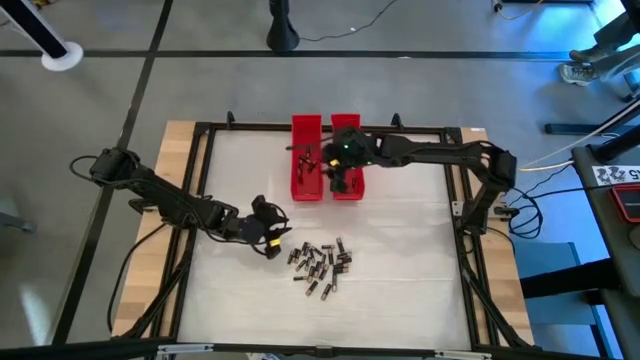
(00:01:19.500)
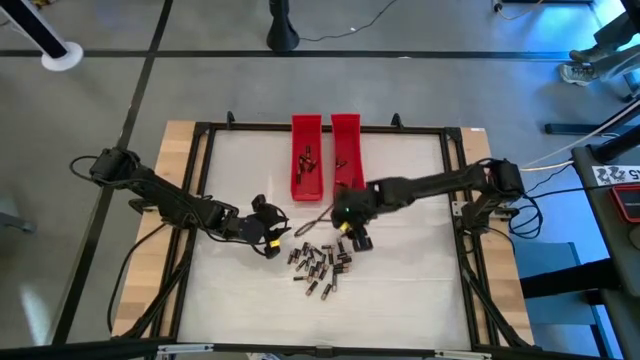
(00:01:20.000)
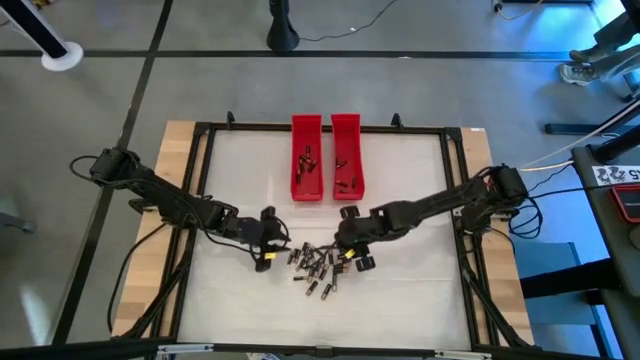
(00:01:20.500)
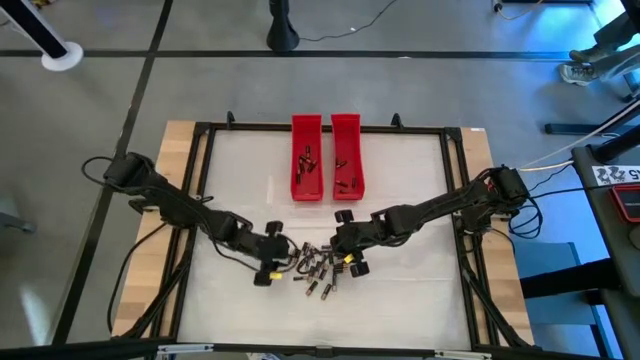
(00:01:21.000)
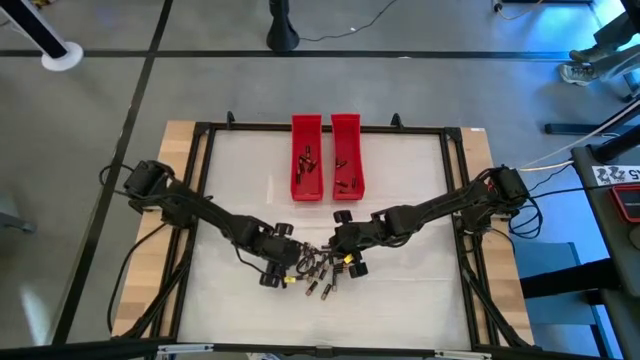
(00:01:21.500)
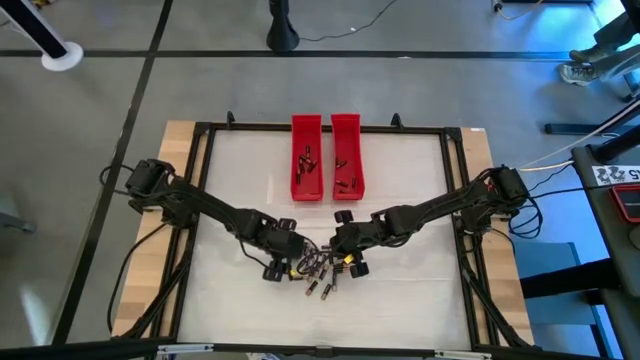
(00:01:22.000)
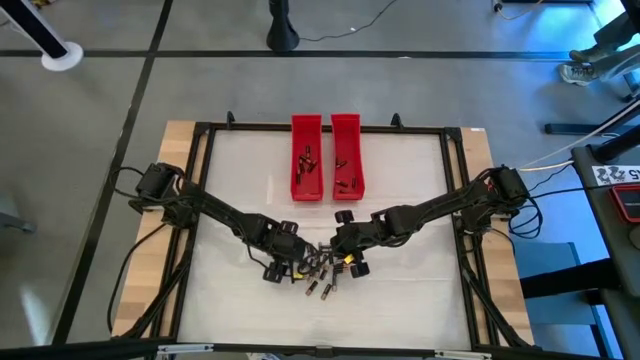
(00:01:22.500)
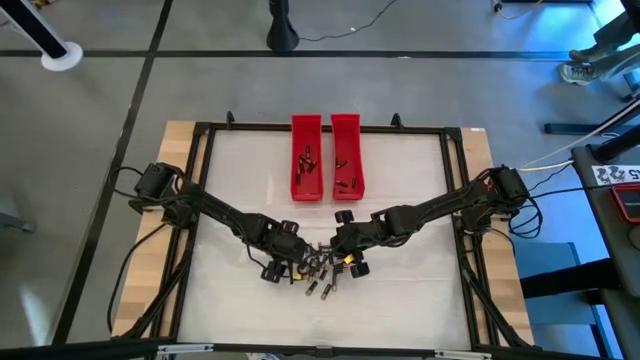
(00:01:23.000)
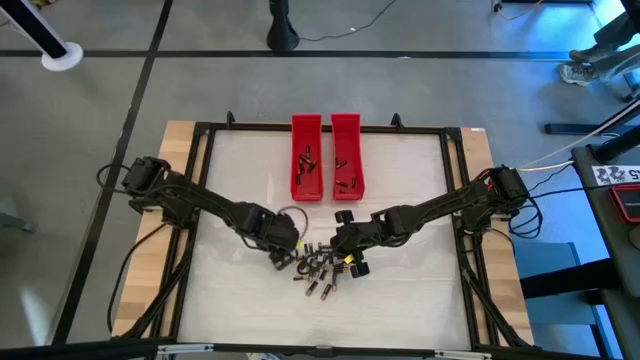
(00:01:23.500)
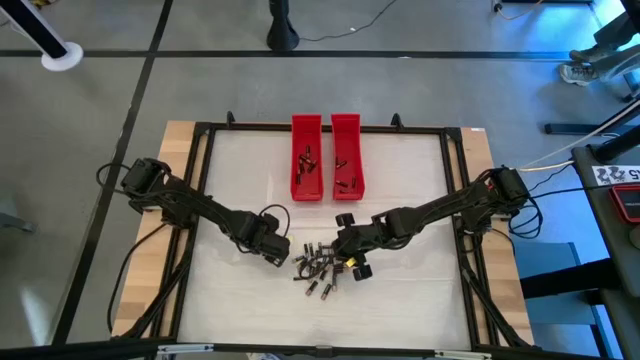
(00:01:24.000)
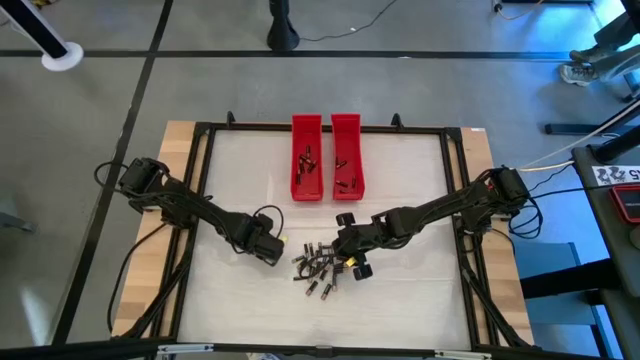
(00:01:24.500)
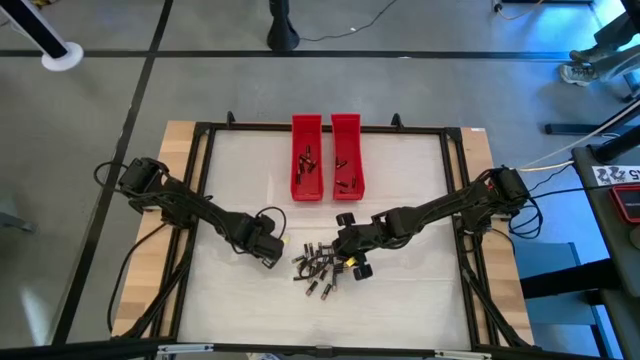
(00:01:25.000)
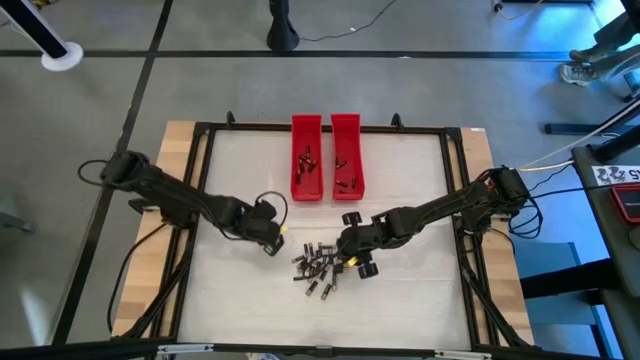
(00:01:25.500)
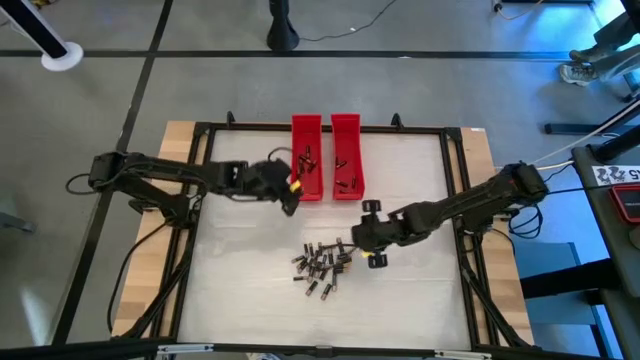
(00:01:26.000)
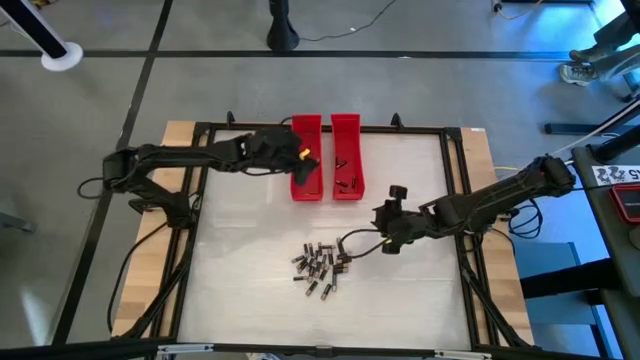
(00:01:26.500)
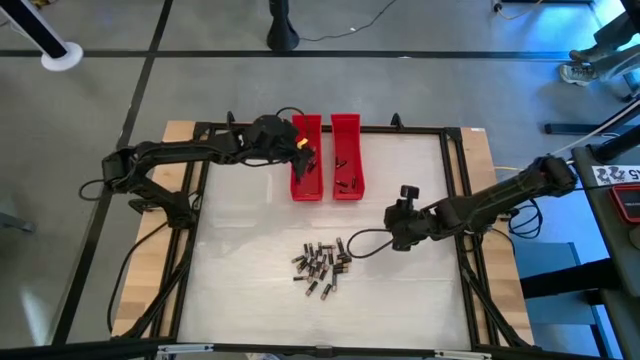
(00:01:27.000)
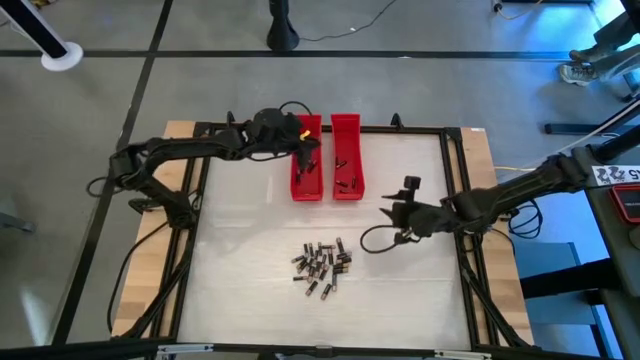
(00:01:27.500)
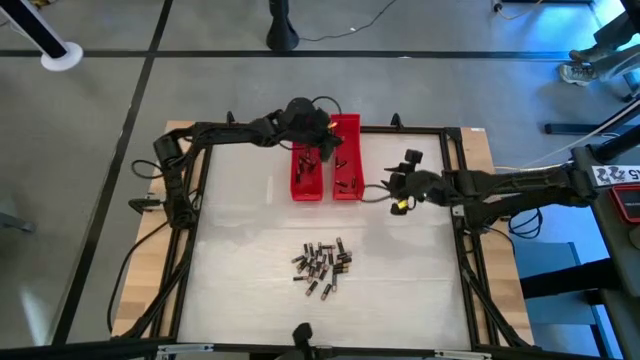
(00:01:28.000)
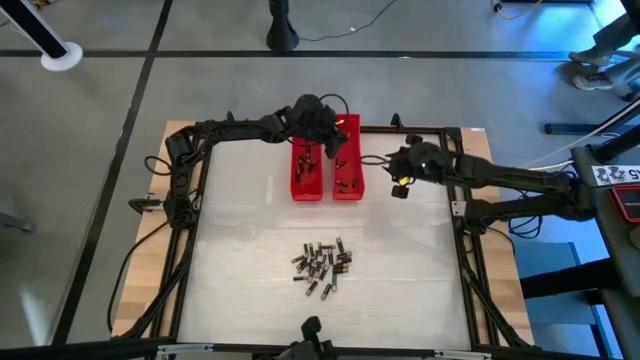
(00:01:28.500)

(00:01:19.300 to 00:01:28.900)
Task: Sort batteries
Put the small black battery into the right red bin

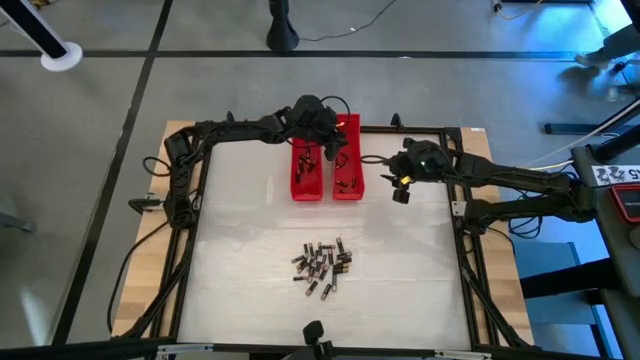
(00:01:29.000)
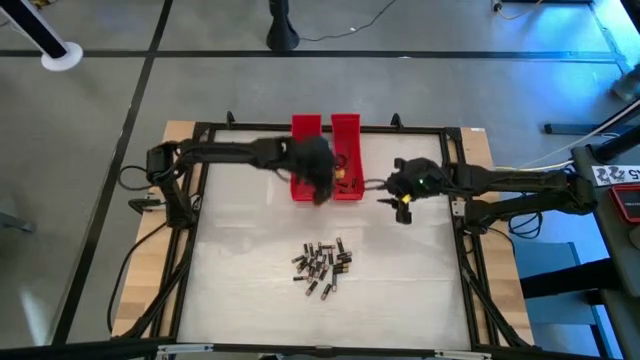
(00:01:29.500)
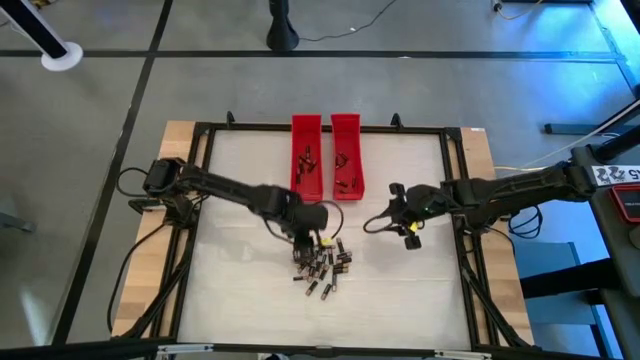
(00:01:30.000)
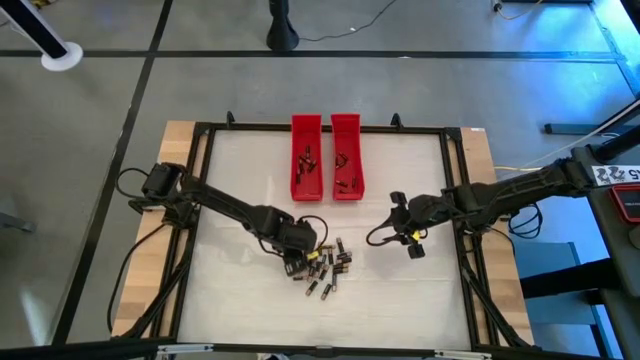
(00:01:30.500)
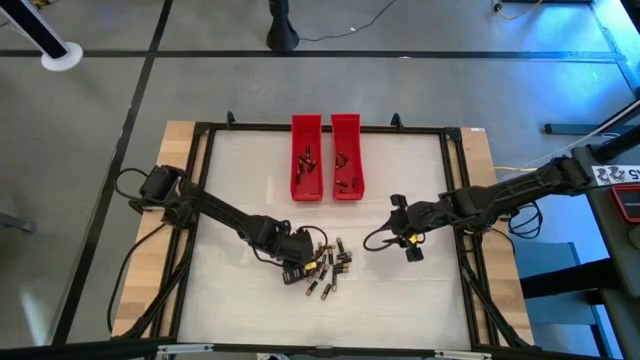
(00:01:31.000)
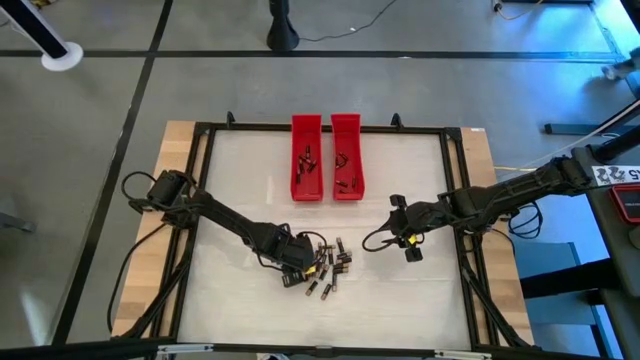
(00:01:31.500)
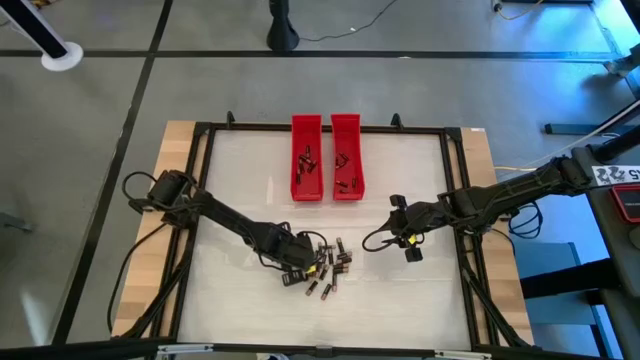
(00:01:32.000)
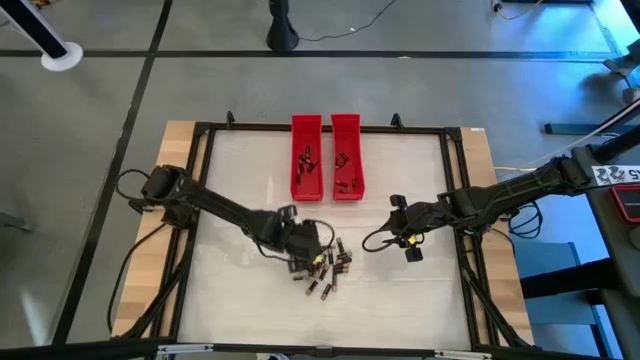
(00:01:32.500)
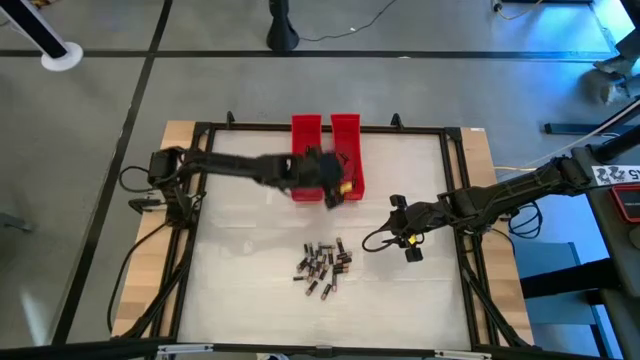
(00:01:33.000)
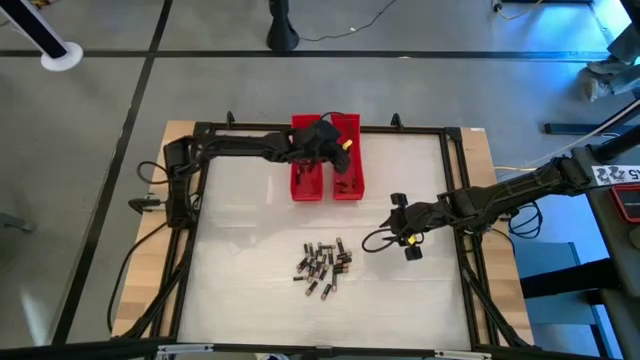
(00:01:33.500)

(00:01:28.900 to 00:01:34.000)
Put the small black battery into the right red bin

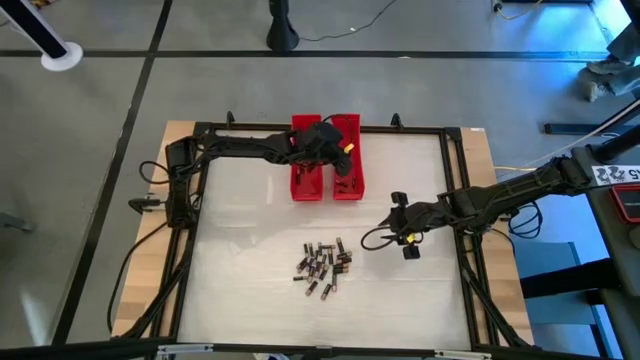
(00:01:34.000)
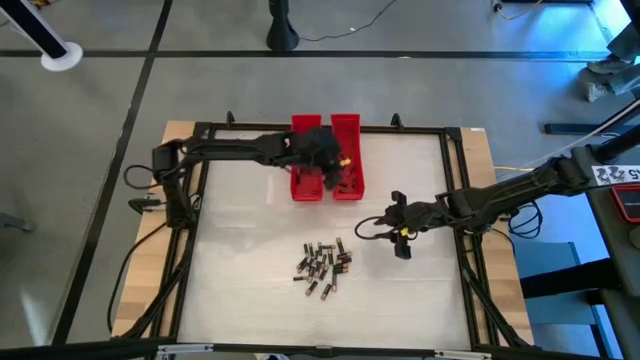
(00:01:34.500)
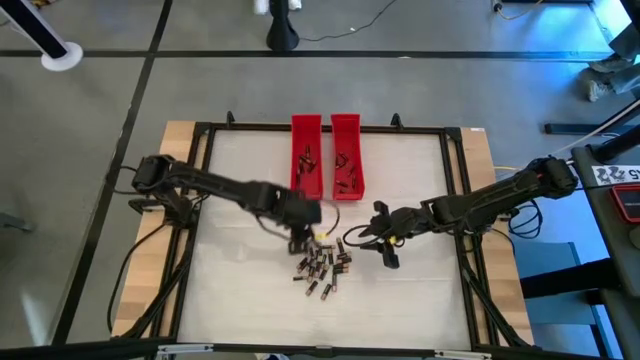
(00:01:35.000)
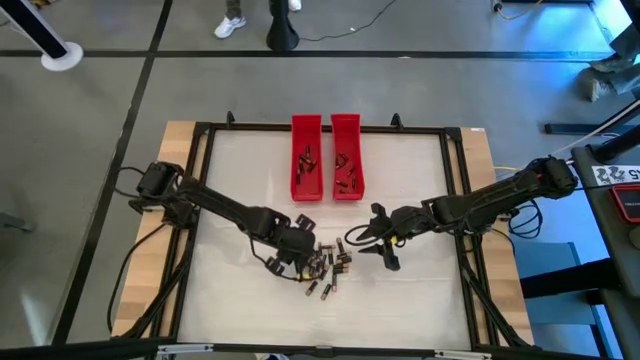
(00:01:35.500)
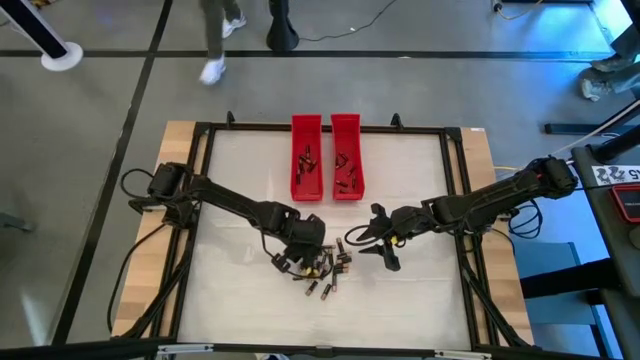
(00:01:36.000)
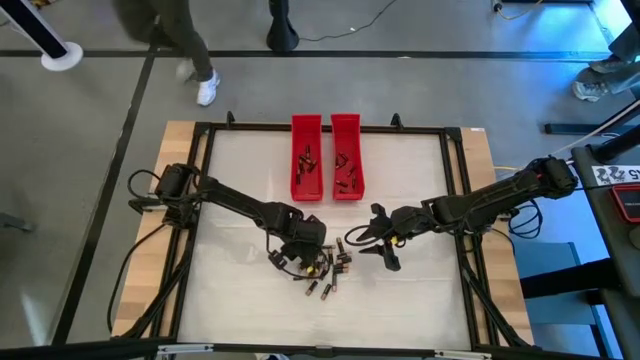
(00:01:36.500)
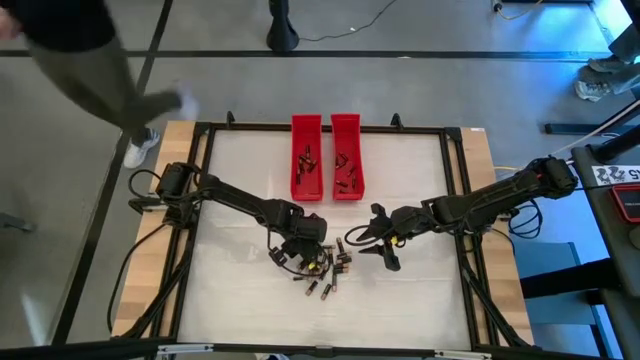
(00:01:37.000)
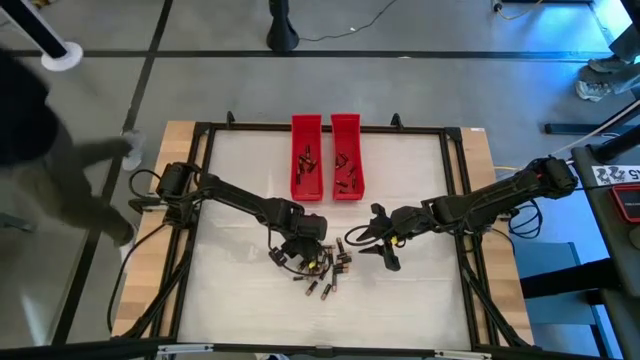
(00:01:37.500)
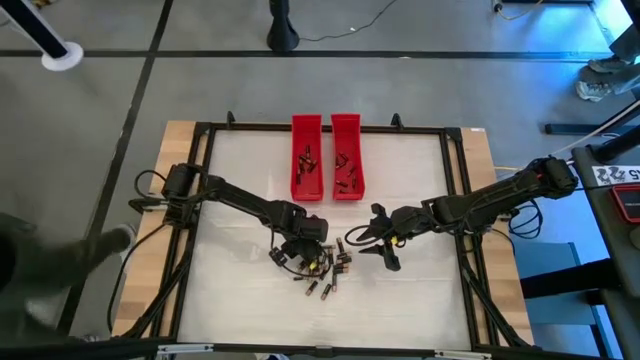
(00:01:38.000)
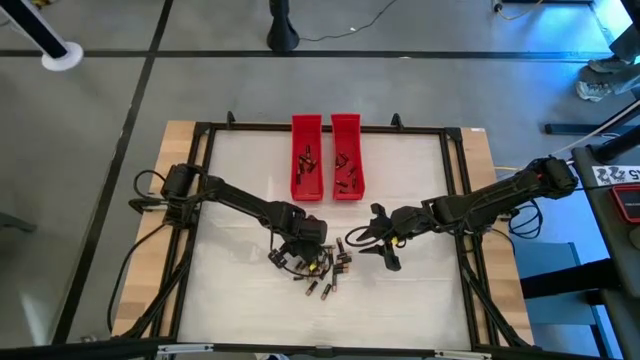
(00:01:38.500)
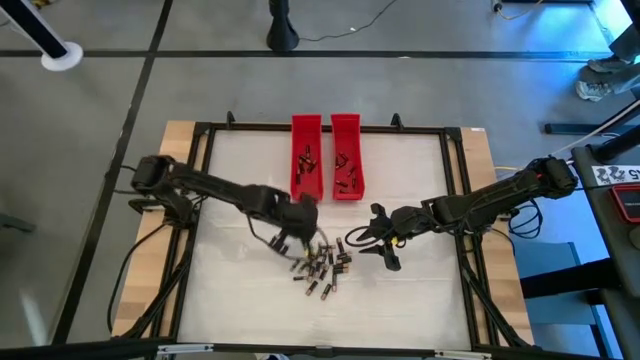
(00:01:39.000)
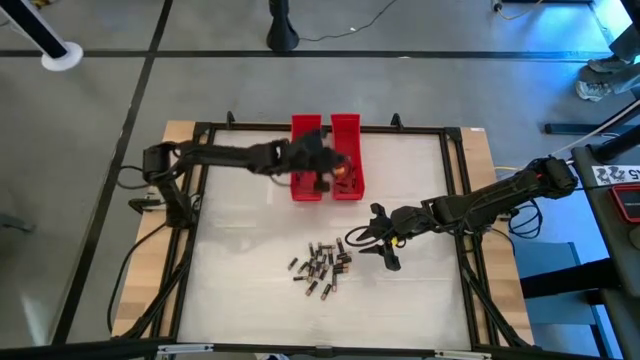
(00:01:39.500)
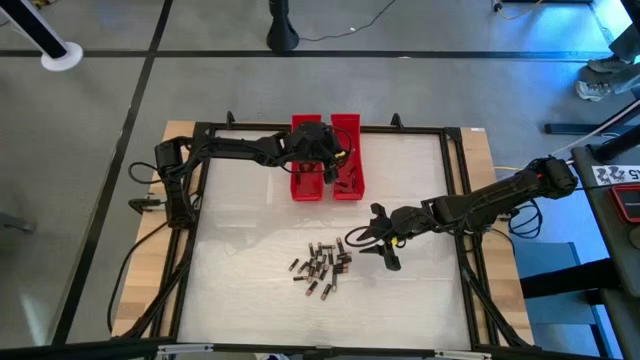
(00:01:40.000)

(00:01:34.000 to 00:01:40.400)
Put the small black battery into the right red bin

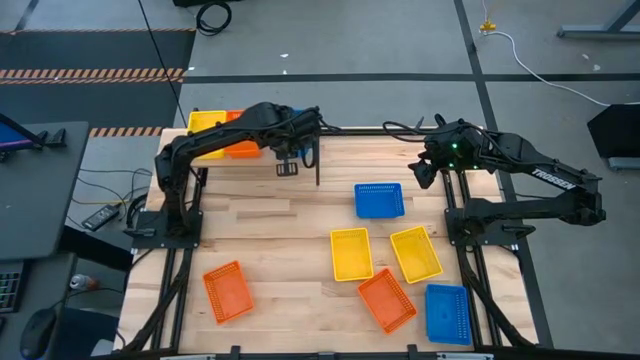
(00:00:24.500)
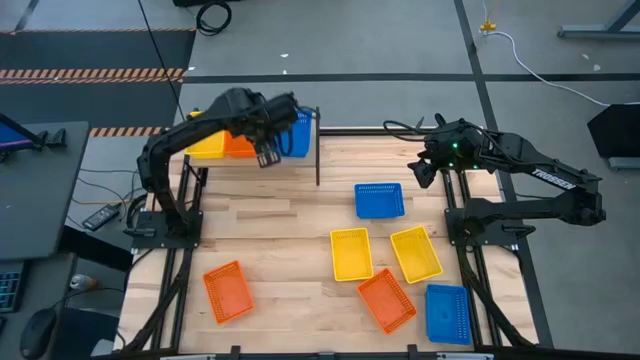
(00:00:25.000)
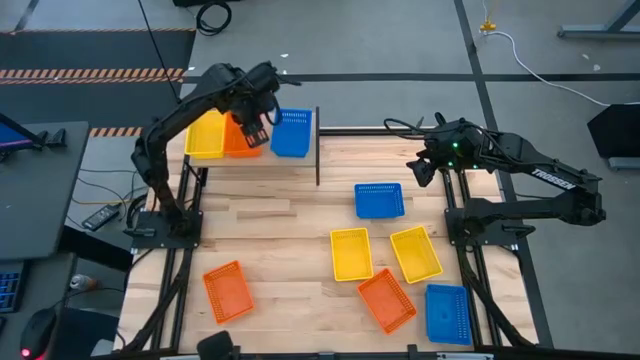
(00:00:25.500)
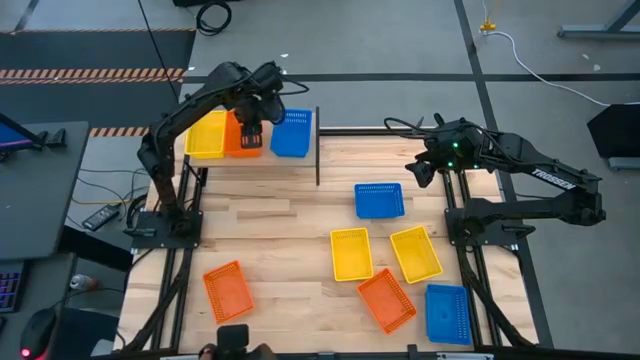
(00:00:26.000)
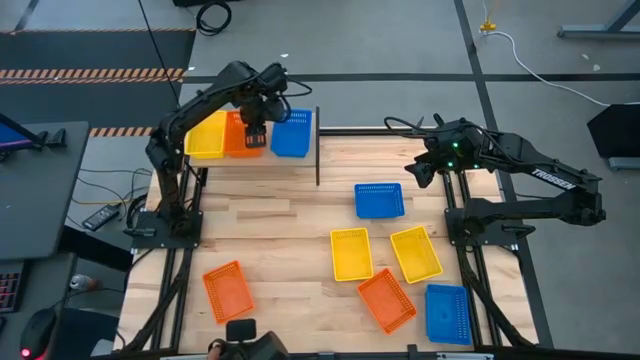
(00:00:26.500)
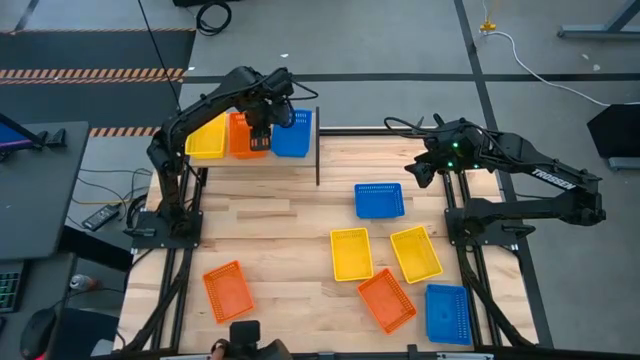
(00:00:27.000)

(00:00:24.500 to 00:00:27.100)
Task: Stack baskets on shelf by color
Adjust the orange bin on the shelf
